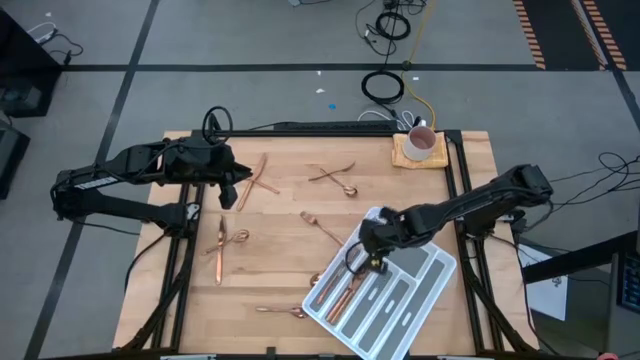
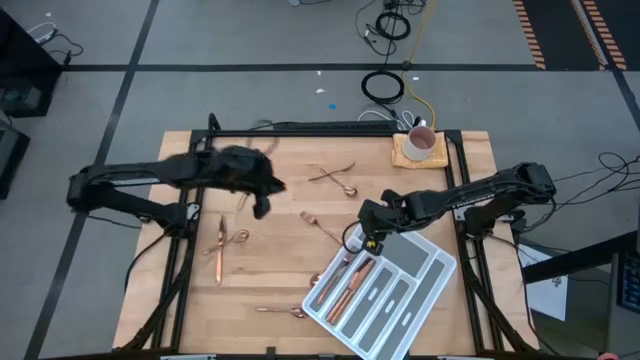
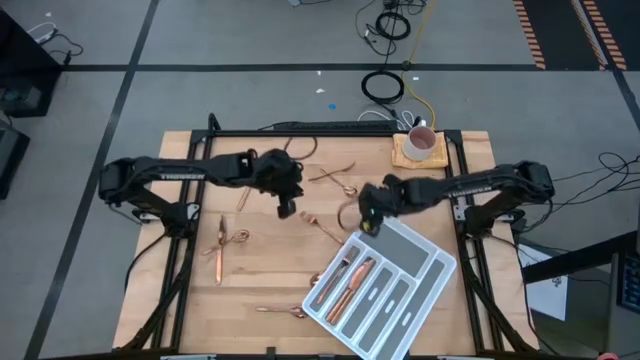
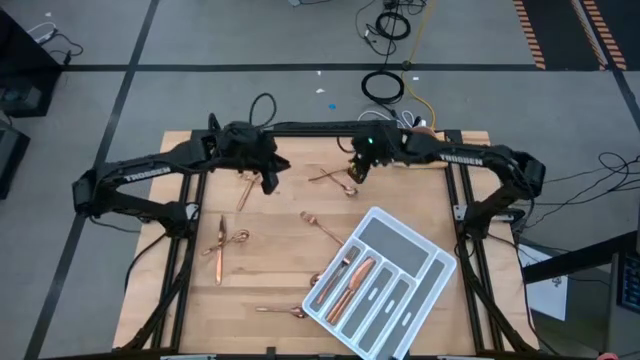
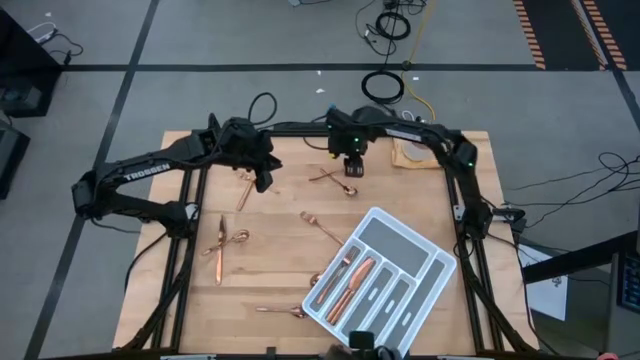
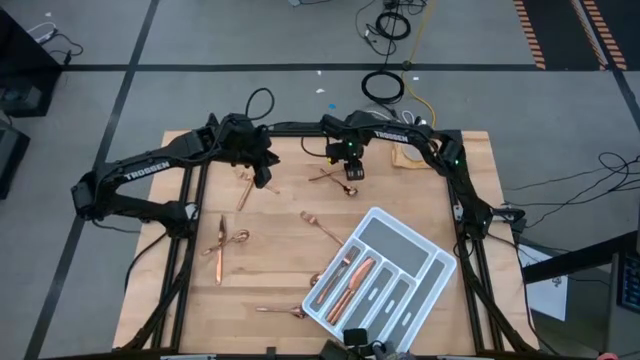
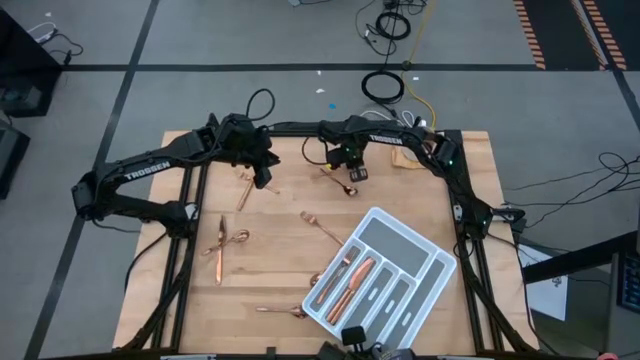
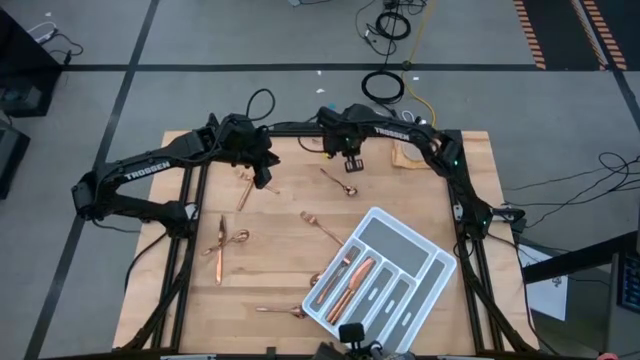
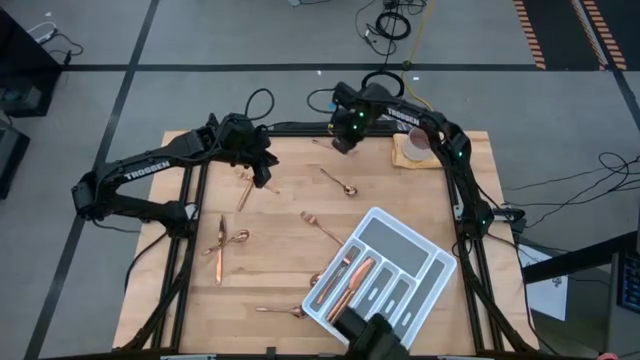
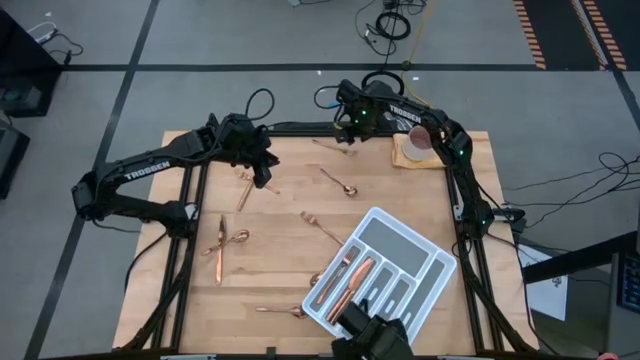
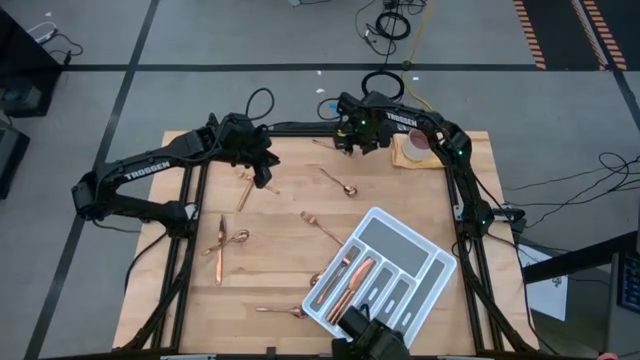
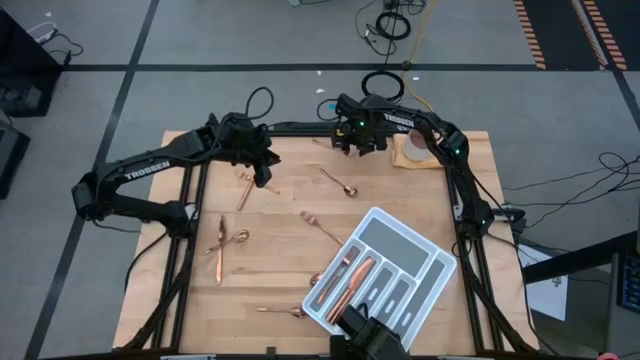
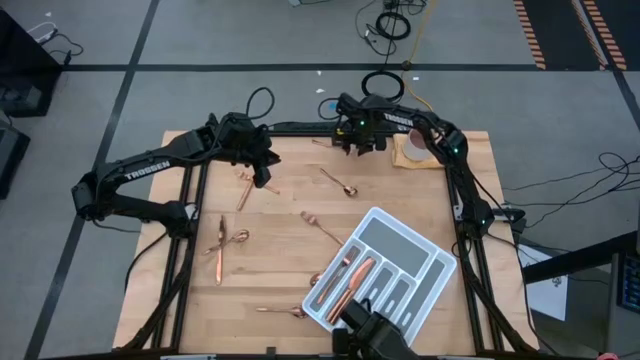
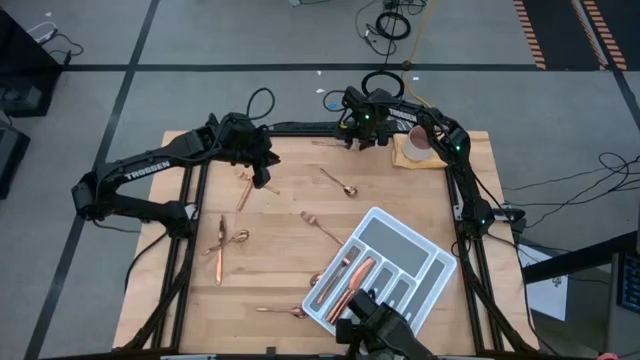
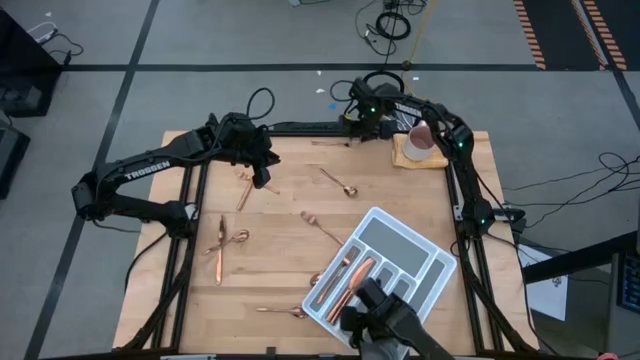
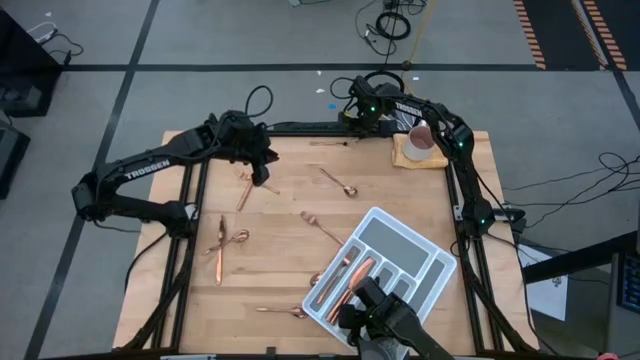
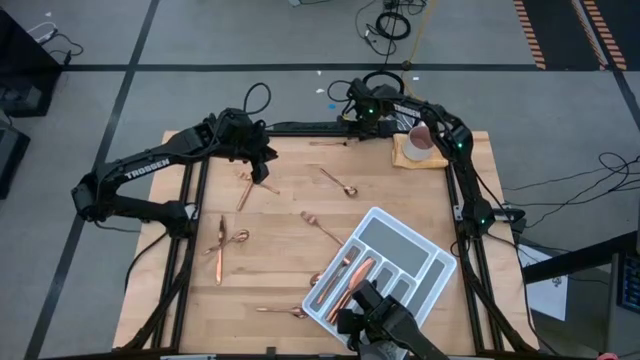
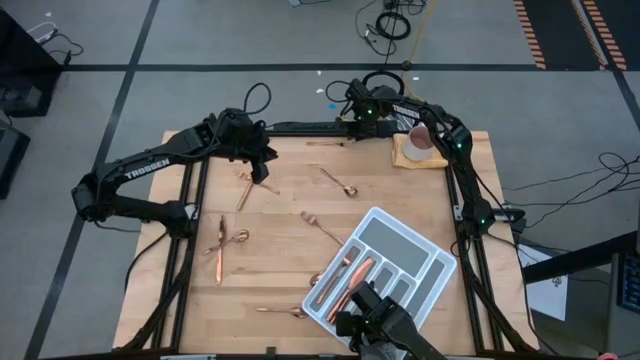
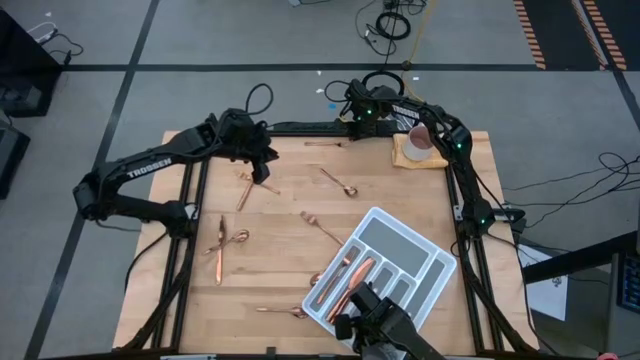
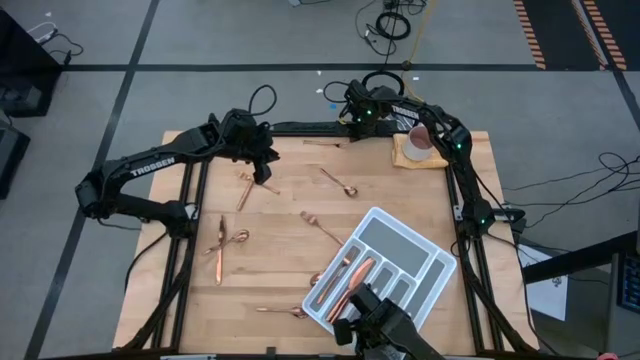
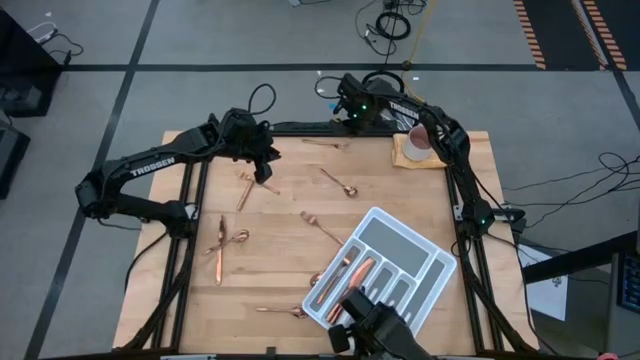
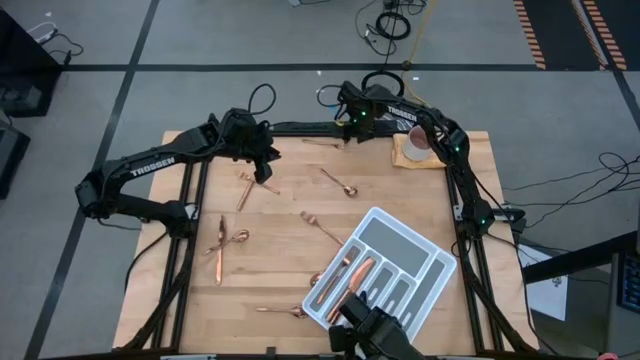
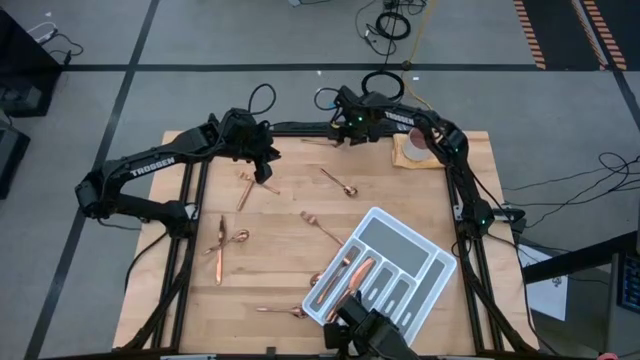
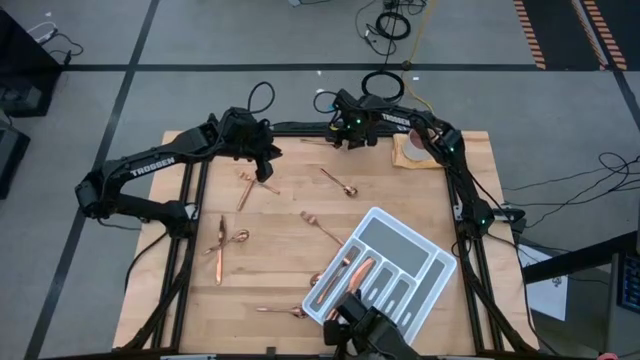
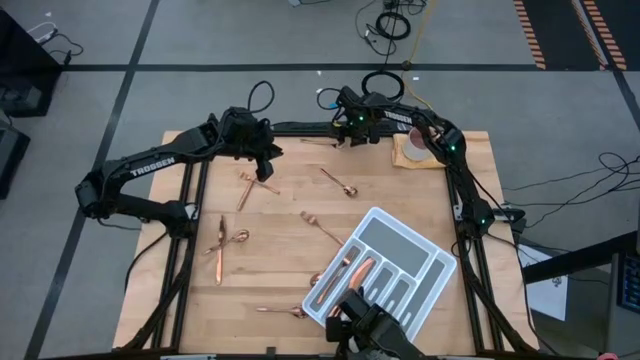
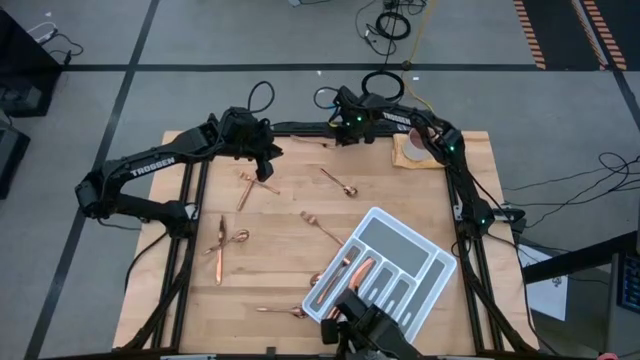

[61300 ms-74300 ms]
Task: Sort silverware
Put the gold fork into the silverware tray
